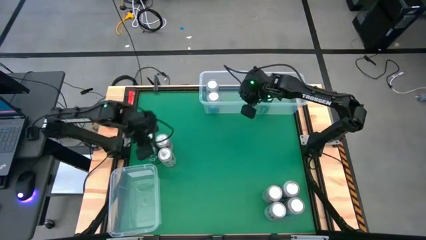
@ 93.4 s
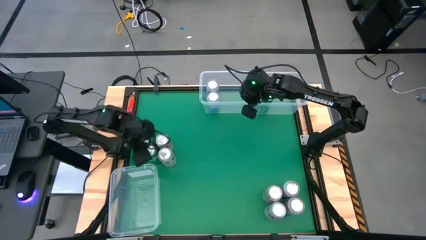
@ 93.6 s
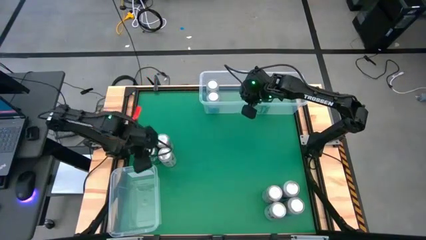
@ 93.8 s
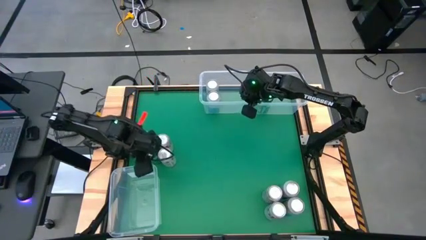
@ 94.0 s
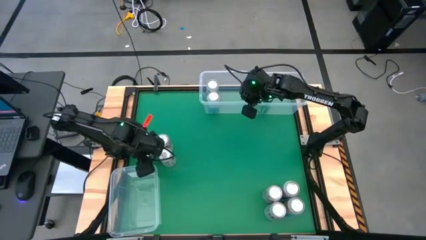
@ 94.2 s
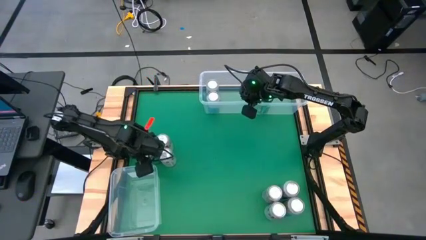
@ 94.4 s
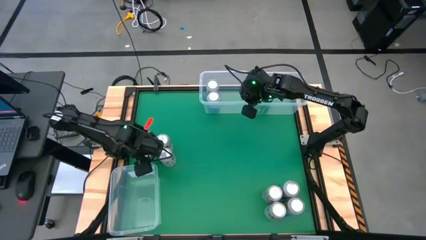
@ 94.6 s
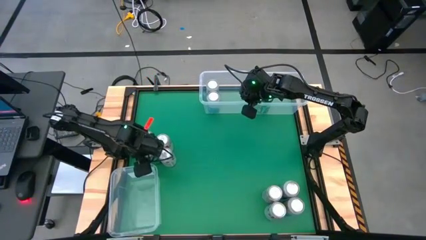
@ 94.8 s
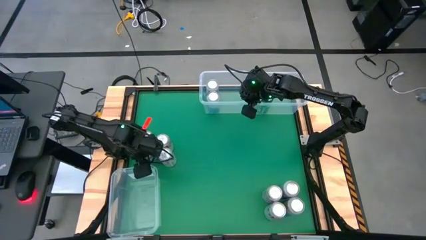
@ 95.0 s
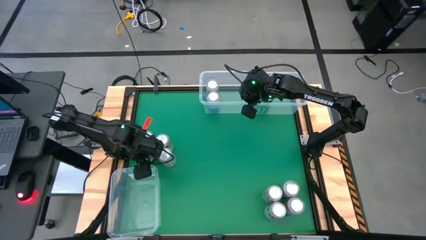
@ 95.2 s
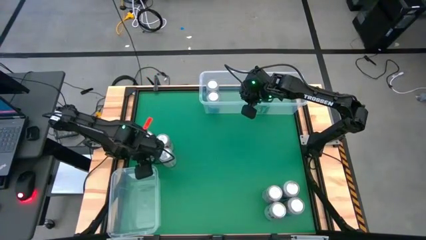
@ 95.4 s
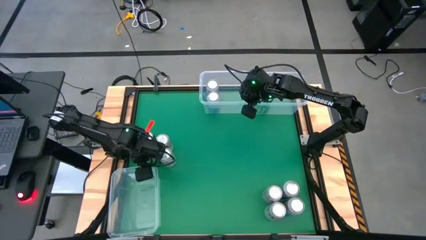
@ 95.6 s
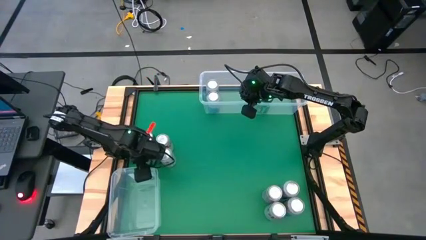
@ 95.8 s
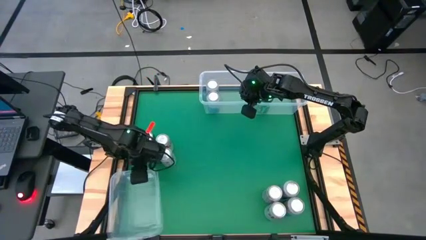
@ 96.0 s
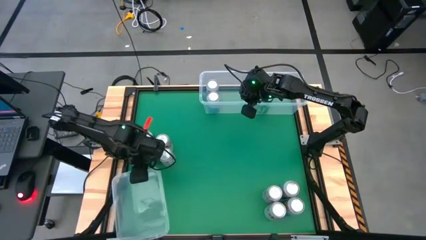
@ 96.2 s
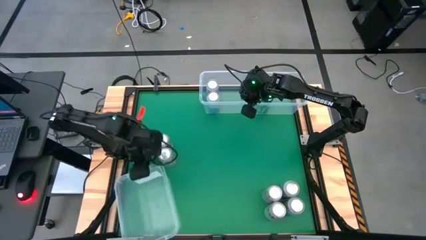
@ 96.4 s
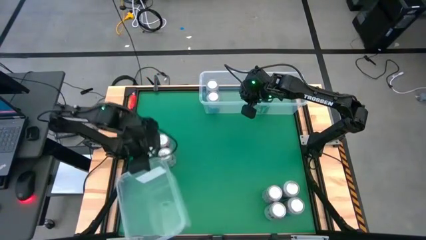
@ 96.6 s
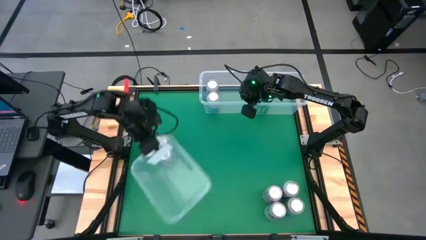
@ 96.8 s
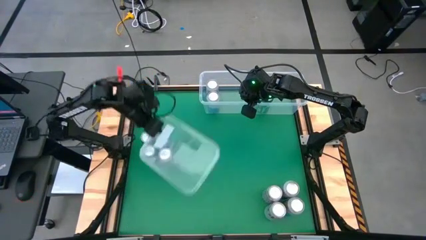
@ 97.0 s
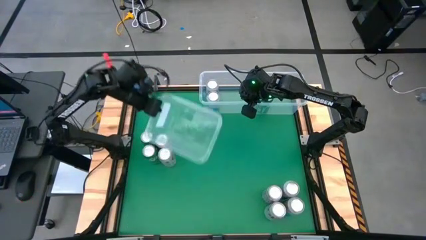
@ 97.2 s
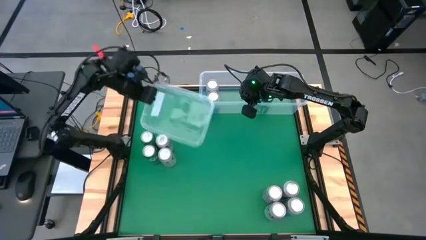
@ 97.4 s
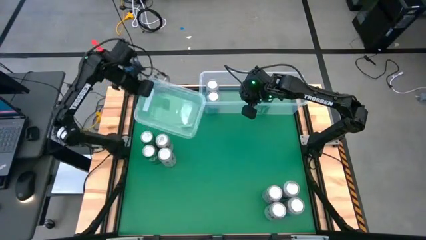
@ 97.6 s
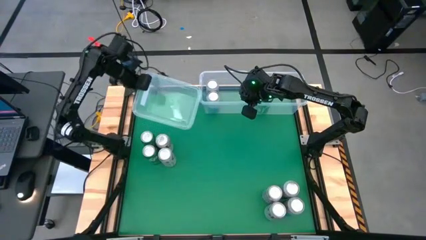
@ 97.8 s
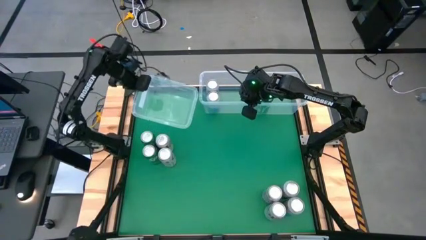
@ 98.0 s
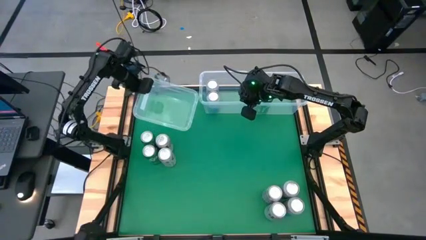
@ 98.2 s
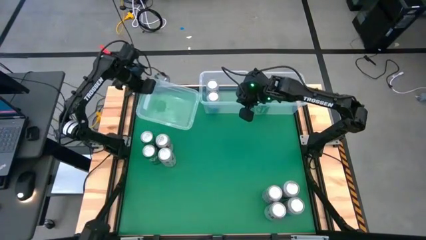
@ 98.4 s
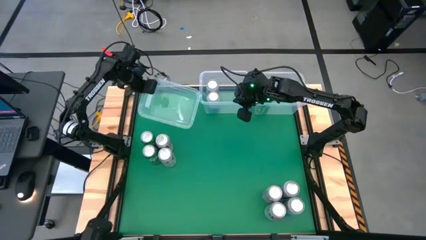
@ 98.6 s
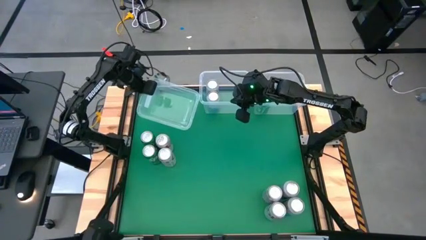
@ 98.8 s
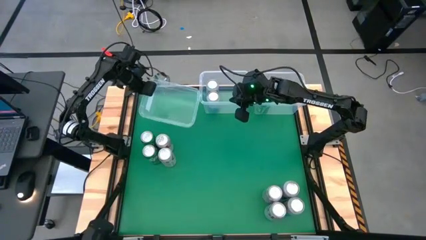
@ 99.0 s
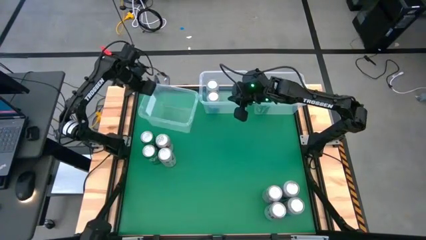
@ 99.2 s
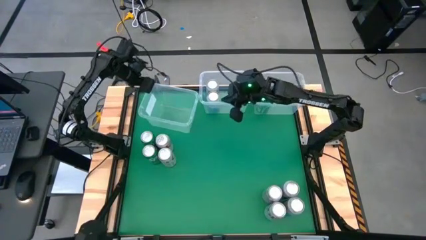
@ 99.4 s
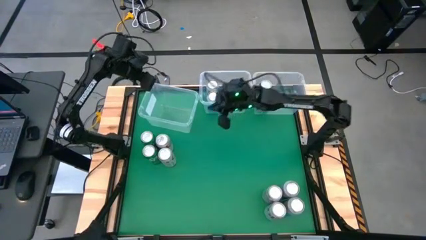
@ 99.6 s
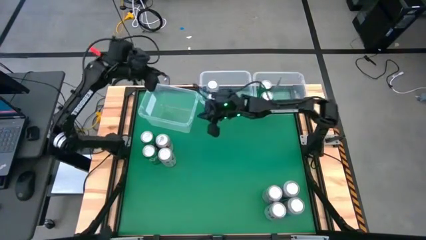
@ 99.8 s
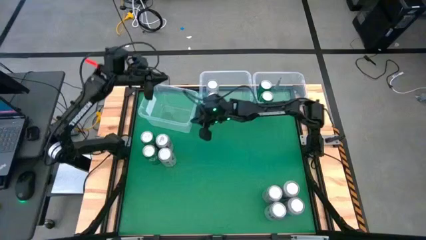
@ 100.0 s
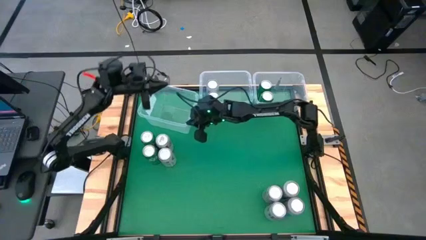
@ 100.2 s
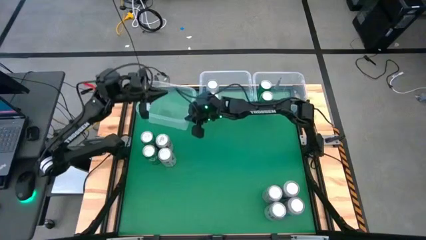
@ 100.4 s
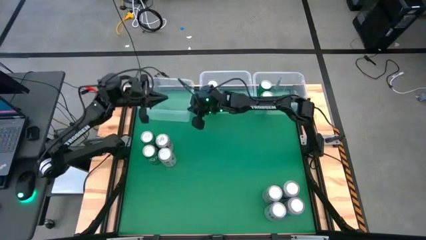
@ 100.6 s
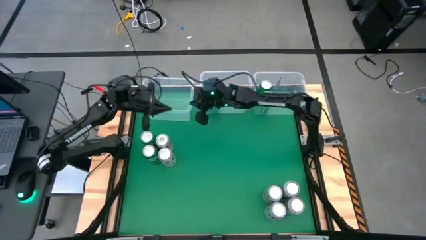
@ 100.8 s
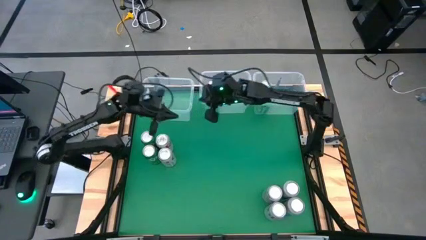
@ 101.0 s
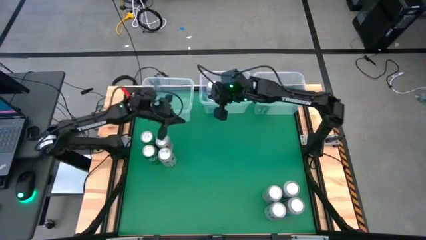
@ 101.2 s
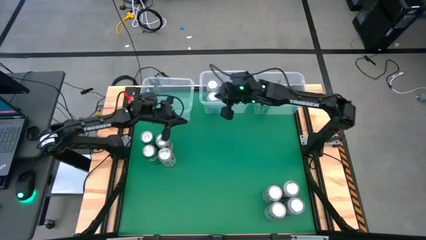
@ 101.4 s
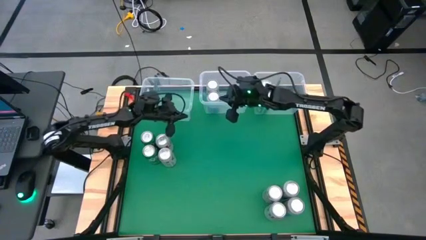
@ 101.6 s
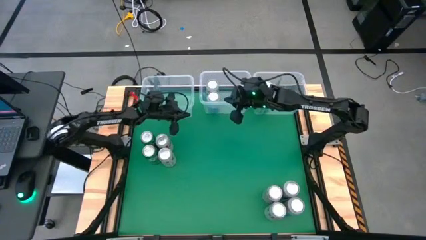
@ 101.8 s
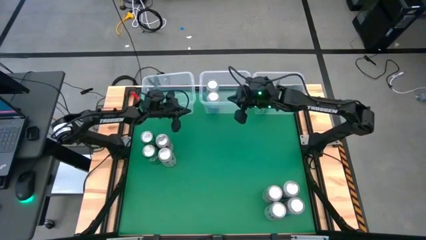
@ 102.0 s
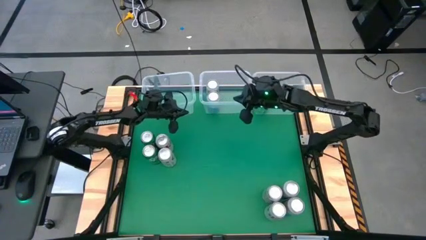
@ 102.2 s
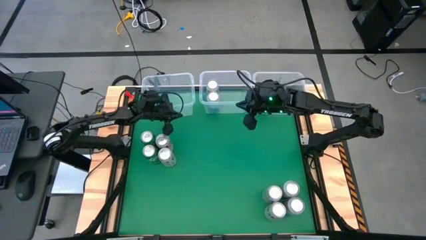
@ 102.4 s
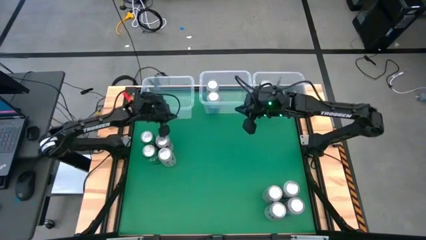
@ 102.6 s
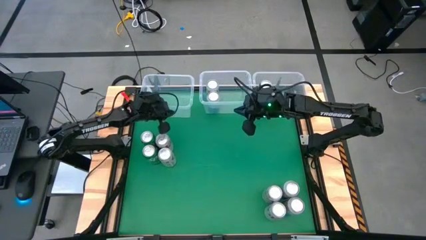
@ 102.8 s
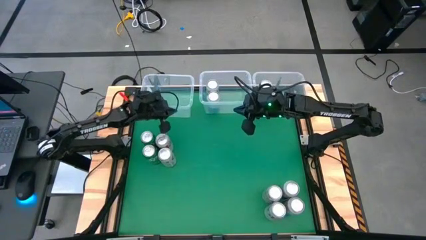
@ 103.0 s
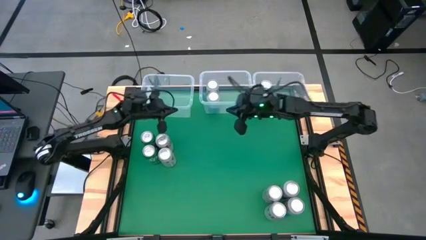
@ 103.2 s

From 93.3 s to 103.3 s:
Task: Sort soda cans
Move the bottom left transparent bin to the top left of the table

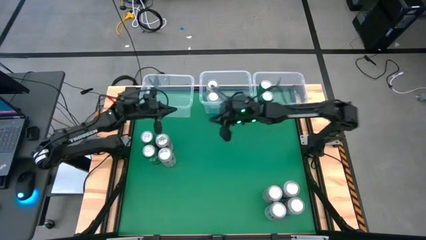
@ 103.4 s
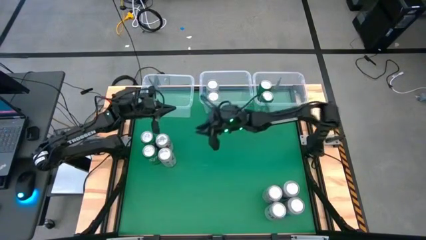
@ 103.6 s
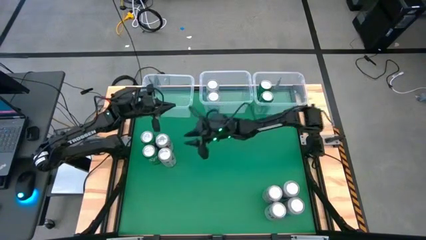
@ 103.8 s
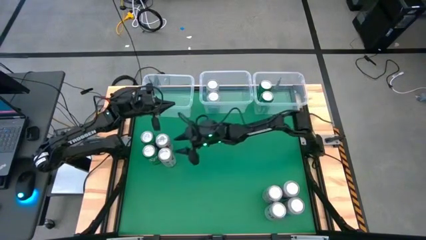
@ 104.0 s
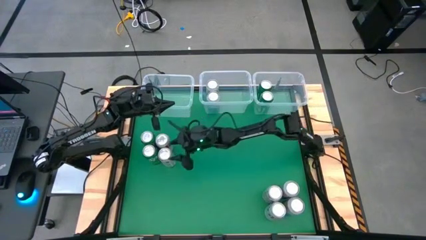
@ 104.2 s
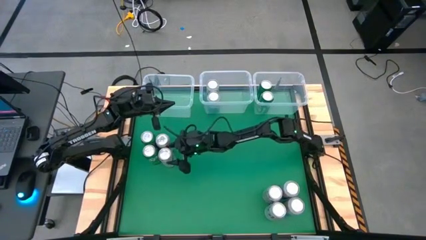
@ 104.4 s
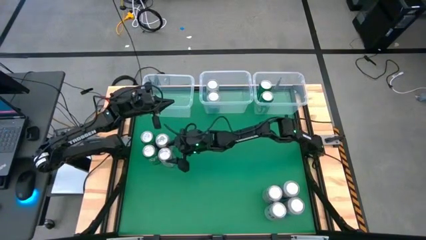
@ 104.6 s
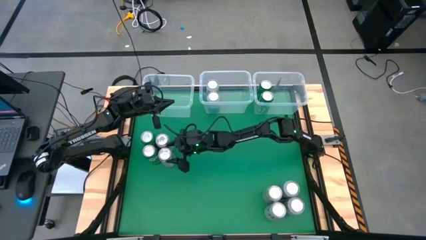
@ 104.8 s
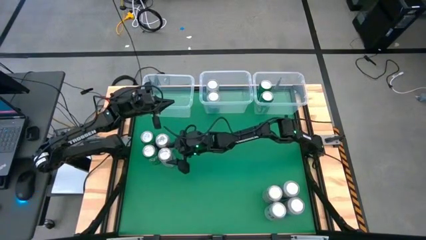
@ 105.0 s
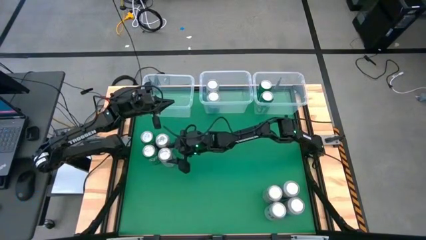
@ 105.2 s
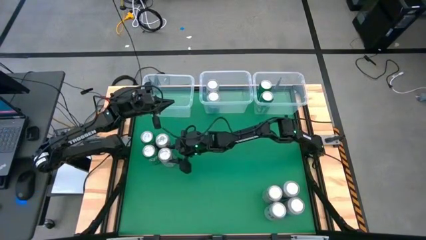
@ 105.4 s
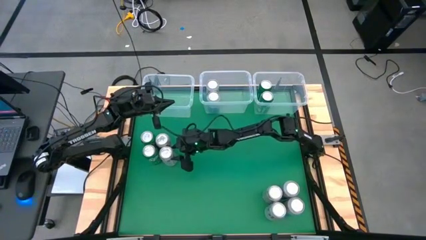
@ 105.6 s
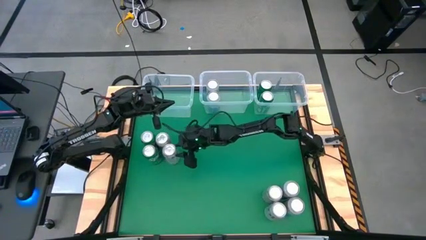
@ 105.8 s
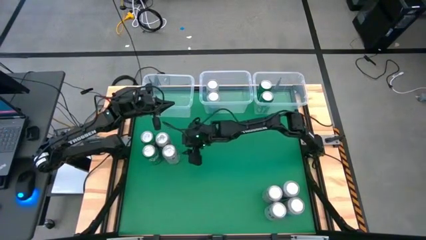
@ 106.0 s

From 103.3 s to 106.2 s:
Put the red silver soda can into the left transparent bin

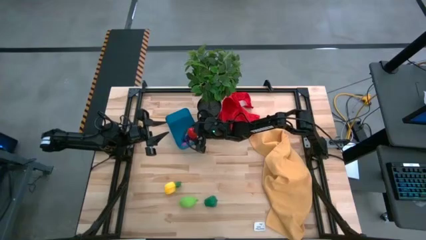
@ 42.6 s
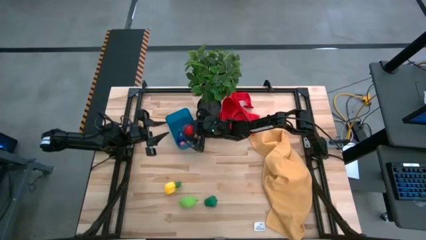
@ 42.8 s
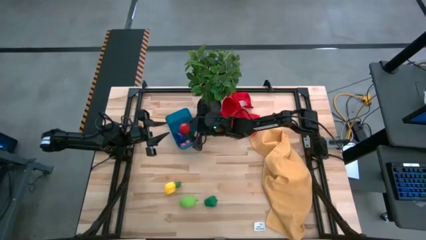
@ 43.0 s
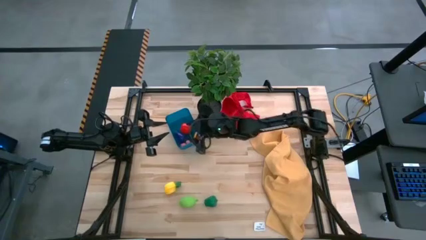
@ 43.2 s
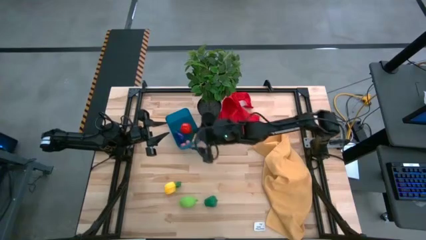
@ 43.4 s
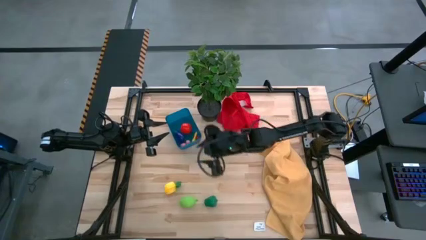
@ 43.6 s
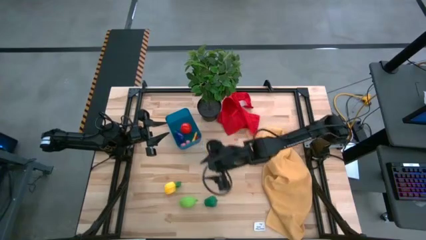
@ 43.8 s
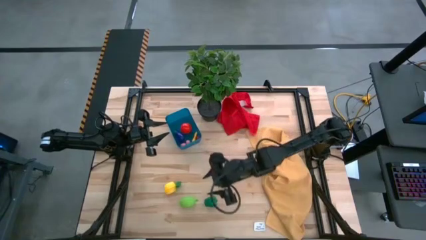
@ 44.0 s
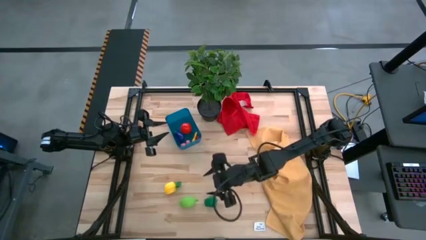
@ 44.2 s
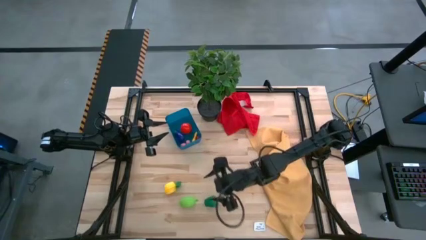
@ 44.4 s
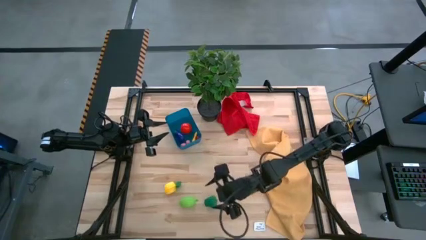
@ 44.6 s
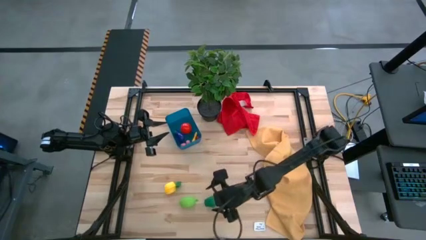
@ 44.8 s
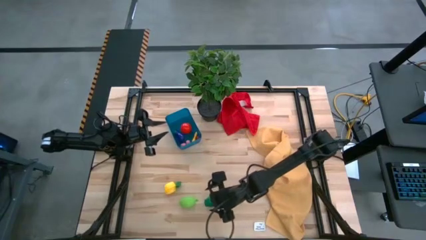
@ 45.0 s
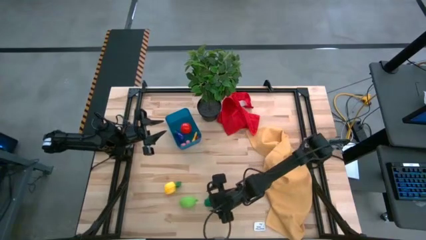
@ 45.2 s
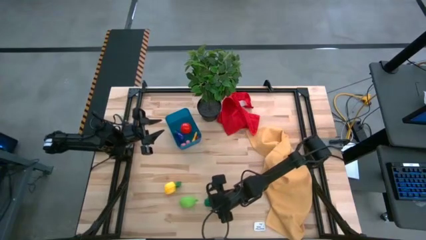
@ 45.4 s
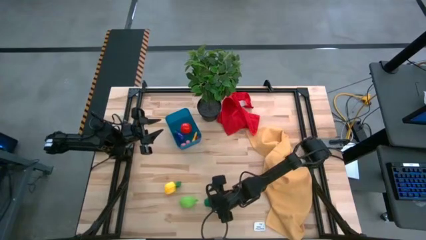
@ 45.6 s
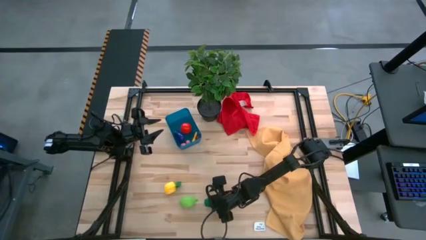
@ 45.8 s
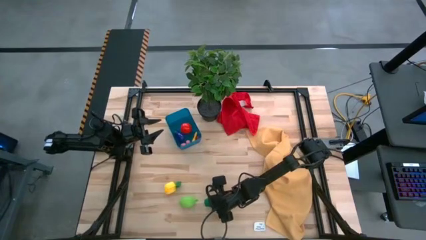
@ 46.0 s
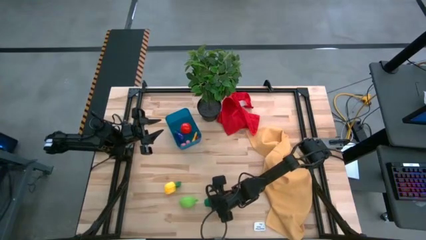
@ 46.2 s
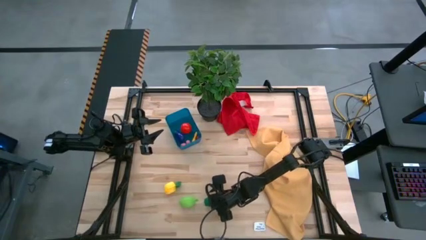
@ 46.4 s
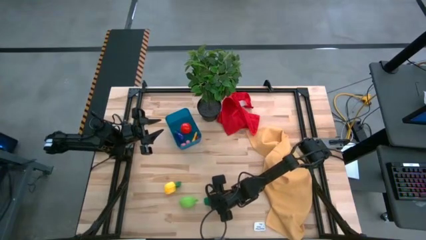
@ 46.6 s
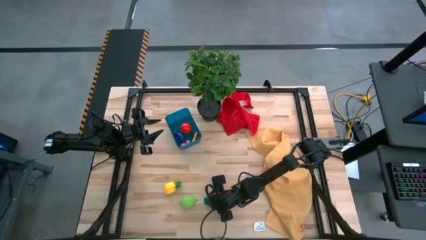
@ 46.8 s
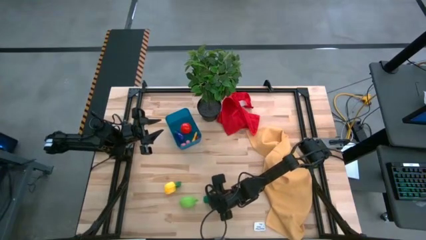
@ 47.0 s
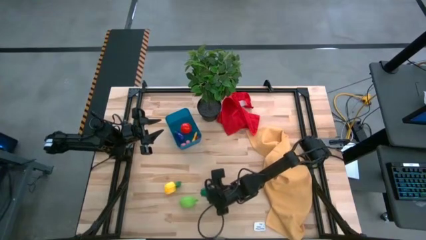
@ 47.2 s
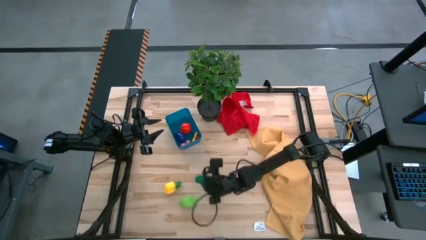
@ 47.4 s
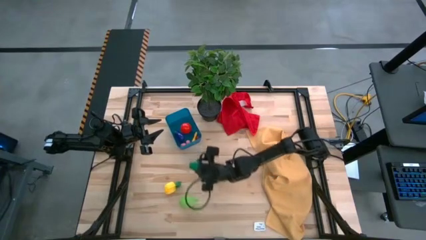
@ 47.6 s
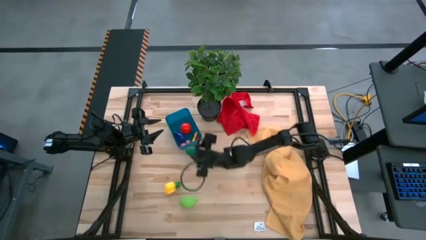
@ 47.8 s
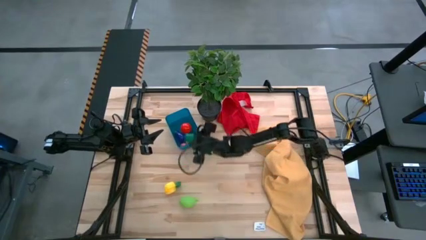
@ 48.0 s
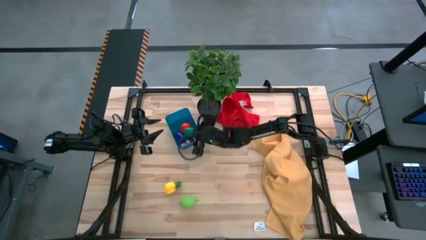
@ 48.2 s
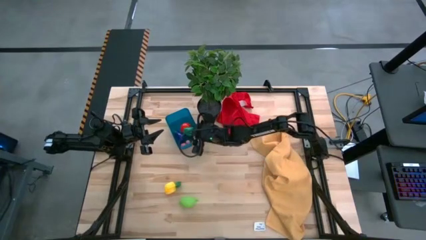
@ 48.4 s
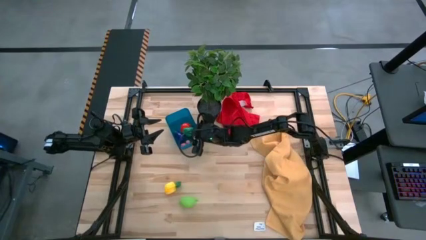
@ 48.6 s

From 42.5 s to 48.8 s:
Task: Pick and placing Produce into tupperware
Put the green bell pepper into the blue bin
